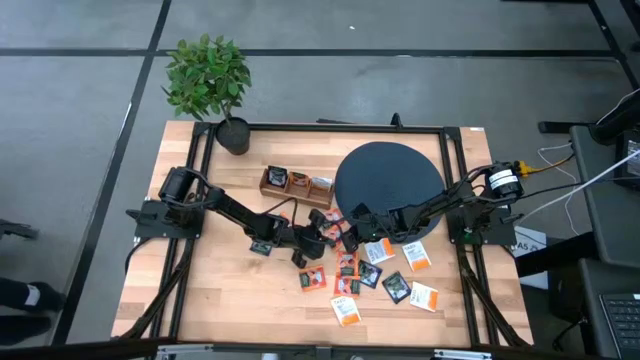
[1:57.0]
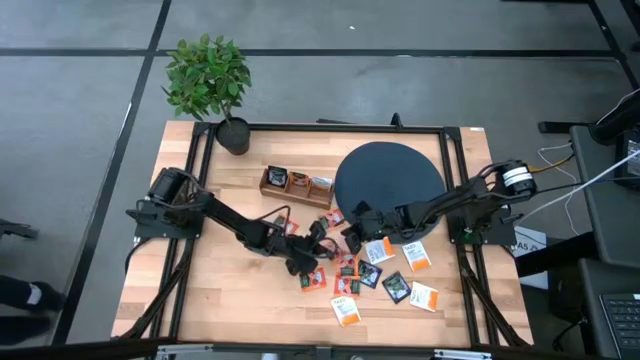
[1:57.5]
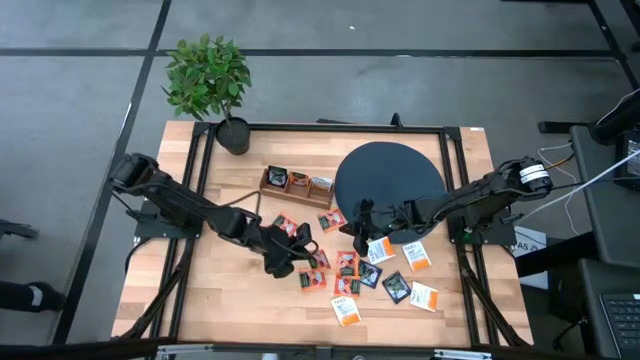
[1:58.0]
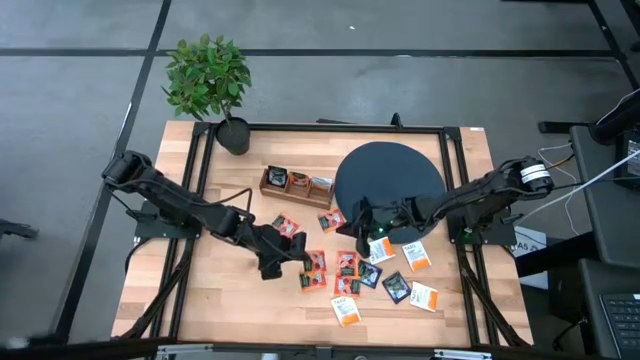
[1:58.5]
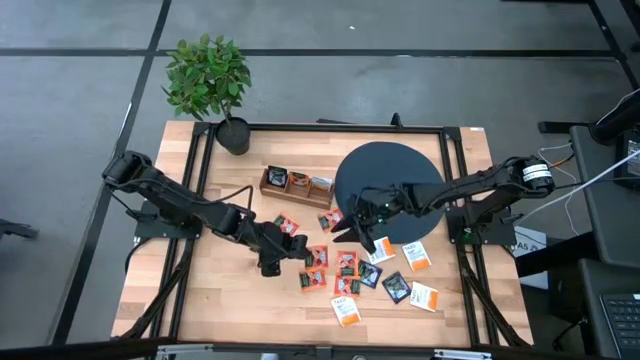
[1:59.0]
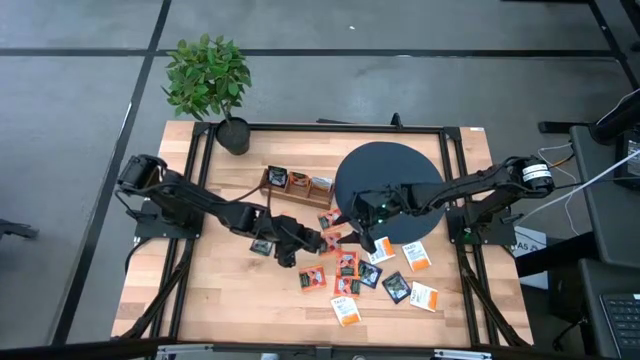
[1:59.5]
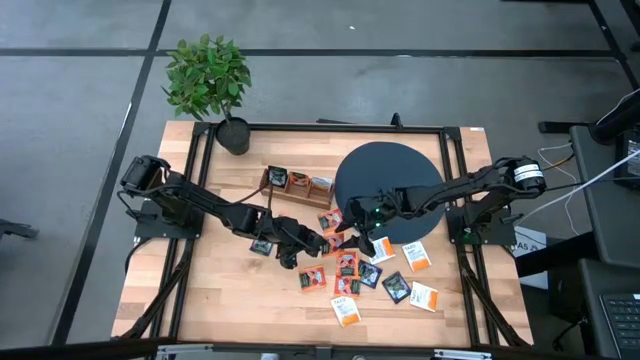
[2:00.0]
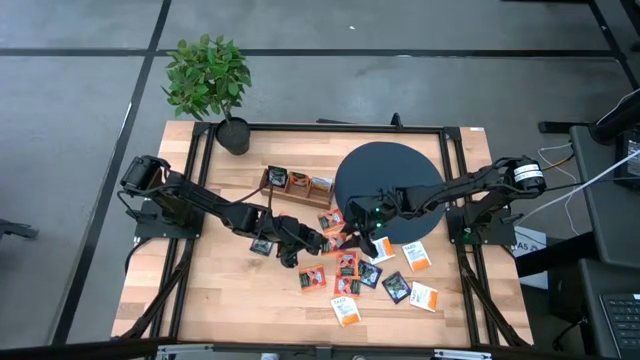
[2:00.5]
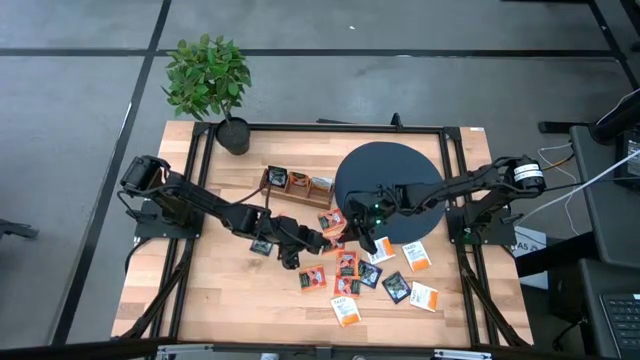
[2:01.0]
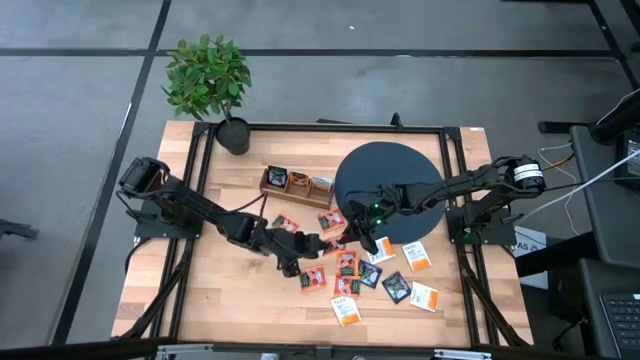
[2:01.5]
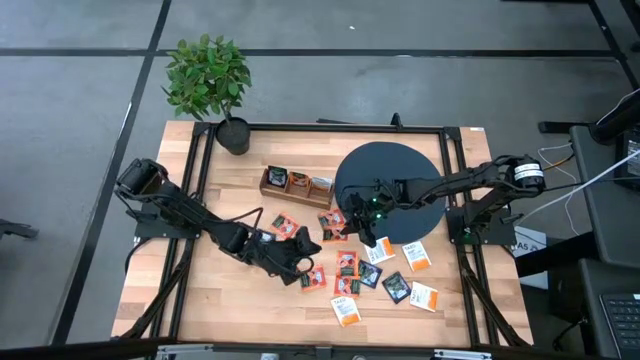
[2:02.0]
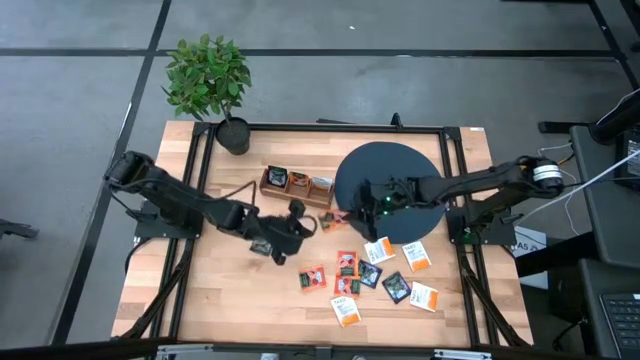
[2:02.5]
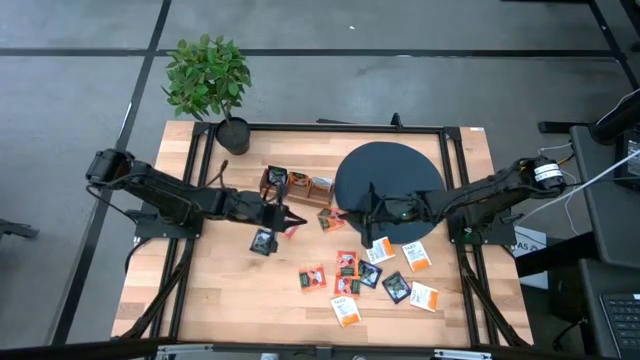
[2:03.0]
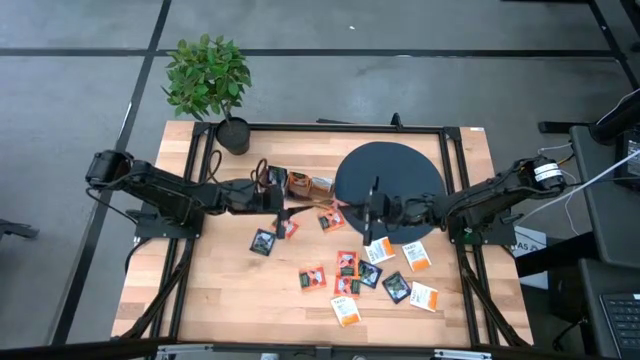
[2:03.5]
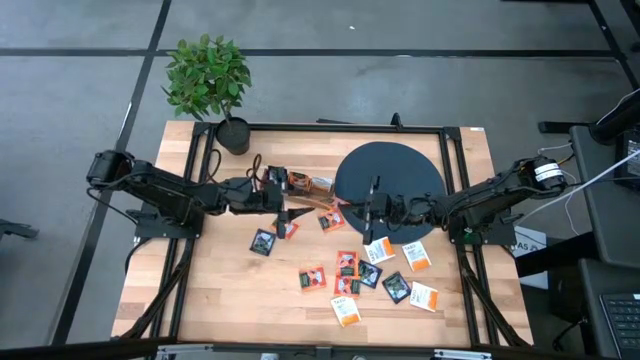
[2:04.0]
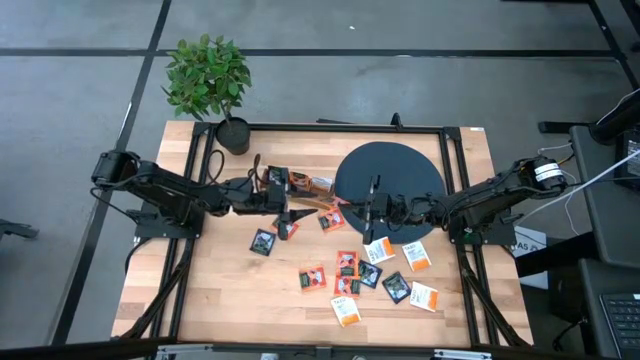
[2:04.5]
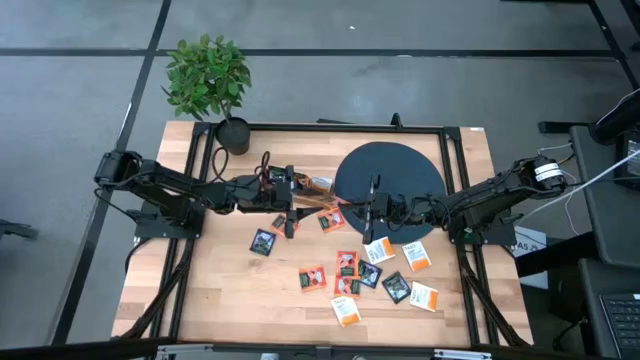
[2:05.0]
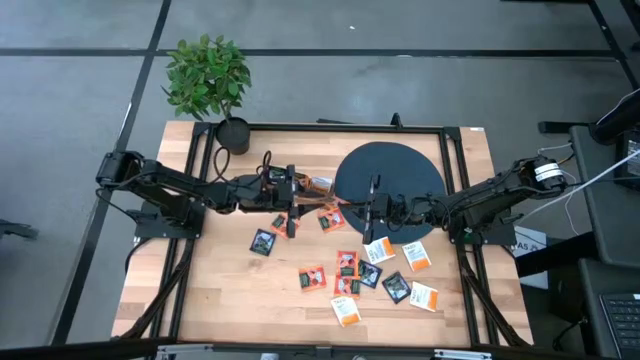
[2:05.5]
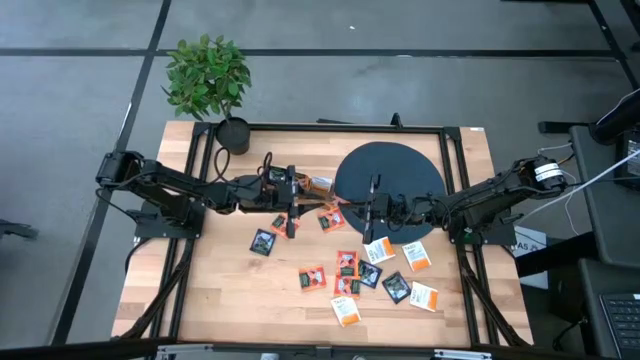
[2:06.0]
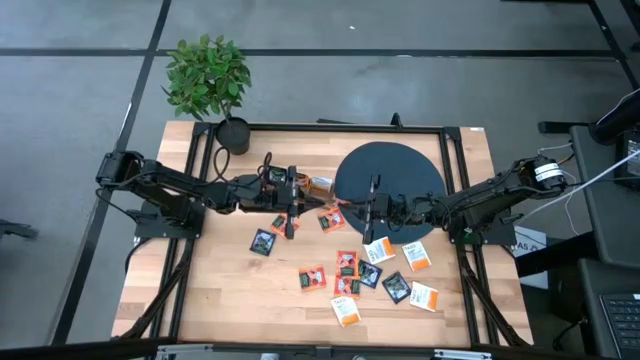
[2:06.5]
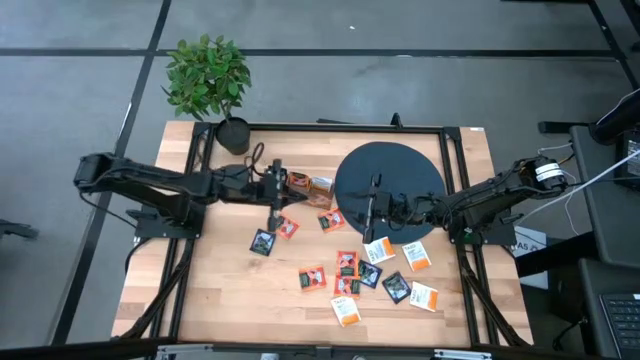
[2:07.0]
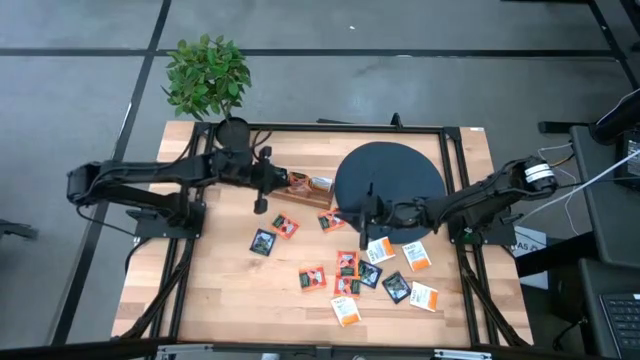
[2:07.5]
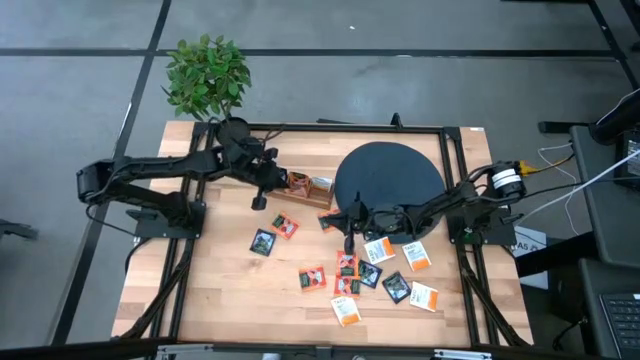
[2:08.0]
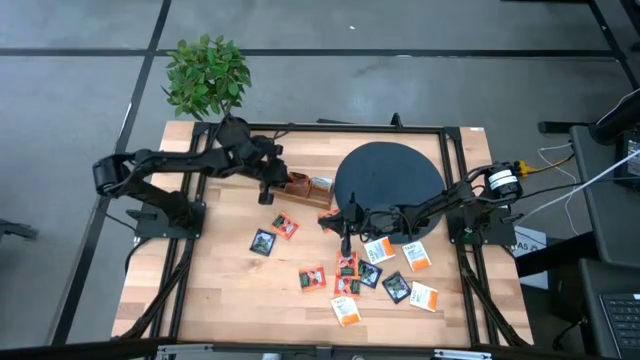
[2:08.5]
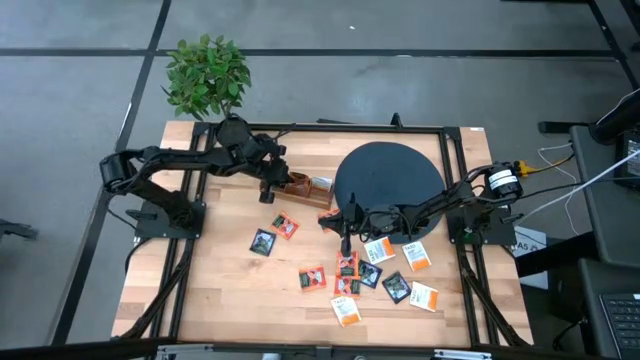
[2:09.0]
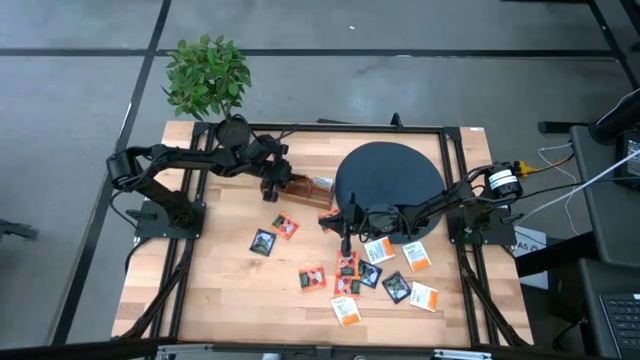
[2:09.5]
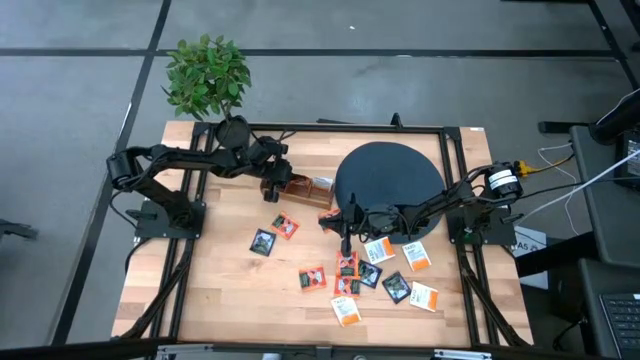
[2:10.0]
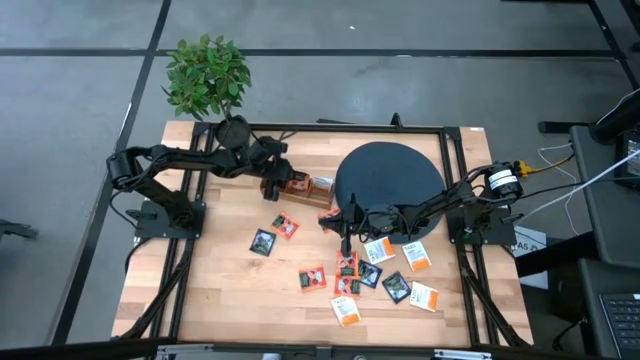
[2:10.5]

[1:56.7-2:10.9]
Task: Pick & Place Tea
Put the orange tea bag into the middle section of the wooden organizer

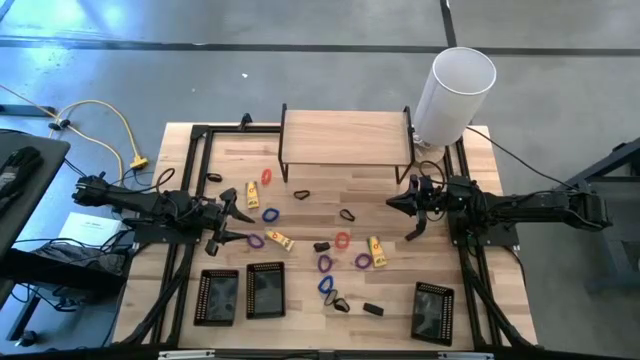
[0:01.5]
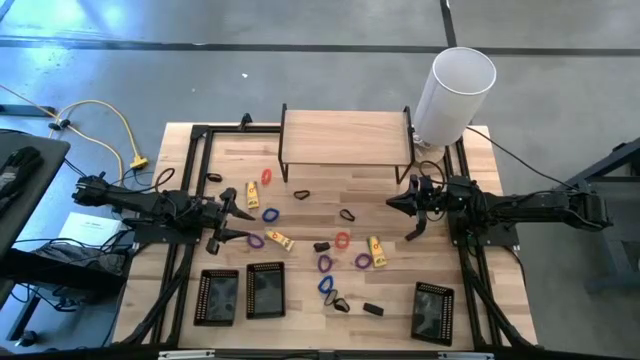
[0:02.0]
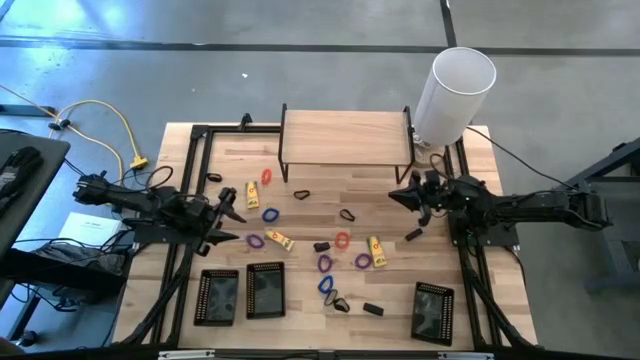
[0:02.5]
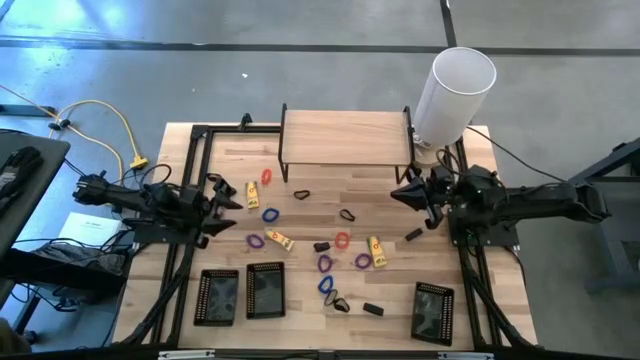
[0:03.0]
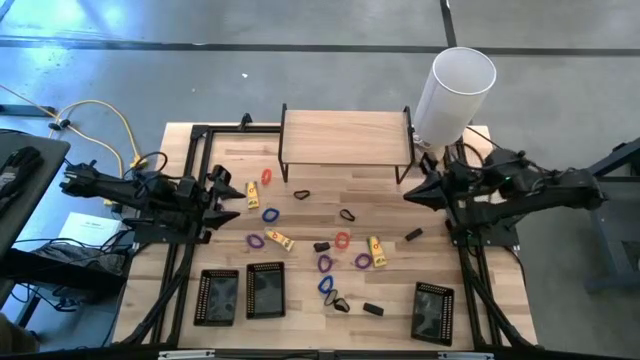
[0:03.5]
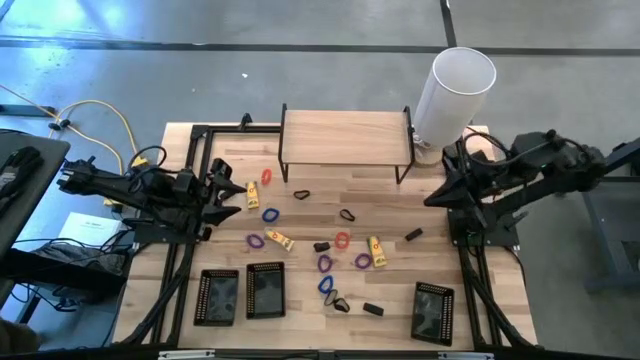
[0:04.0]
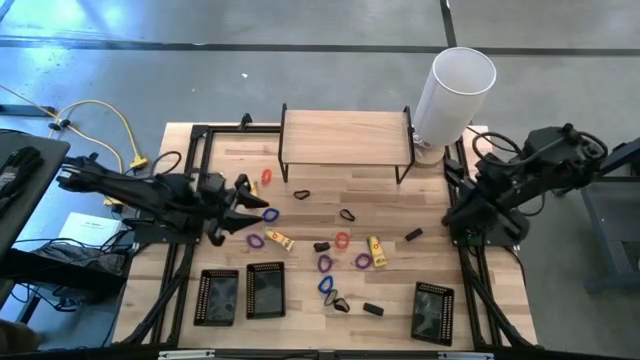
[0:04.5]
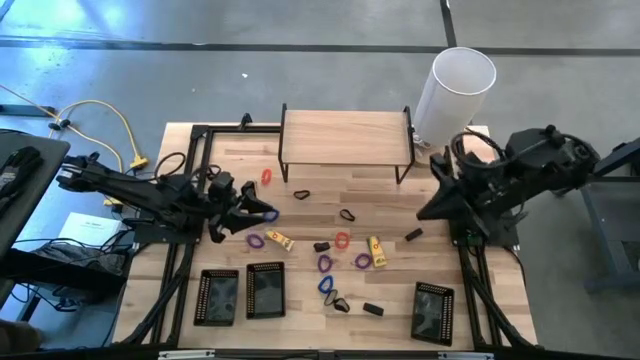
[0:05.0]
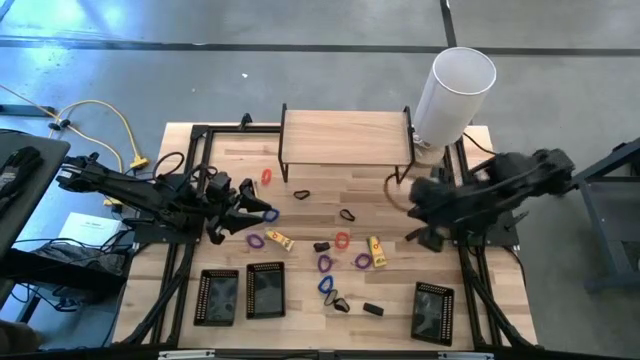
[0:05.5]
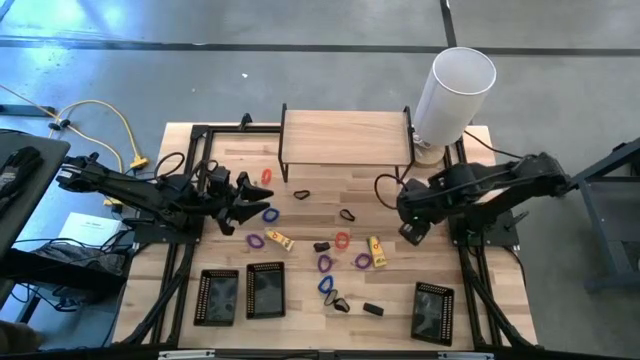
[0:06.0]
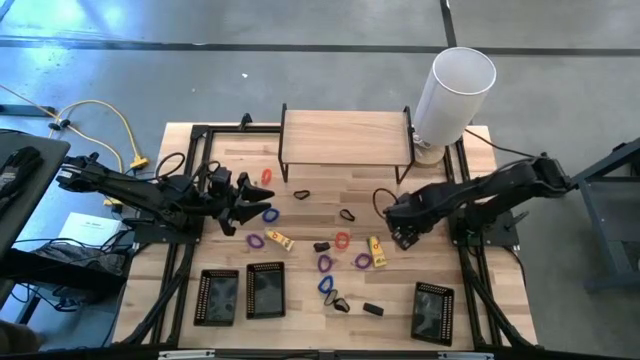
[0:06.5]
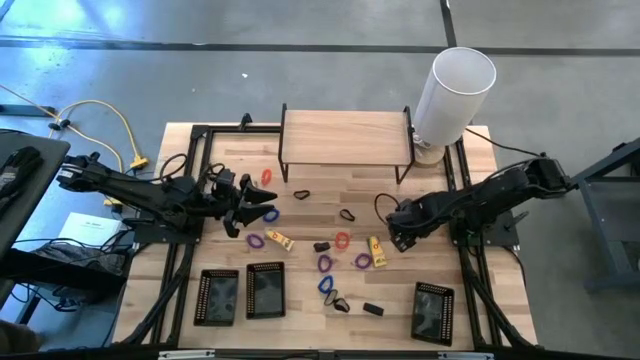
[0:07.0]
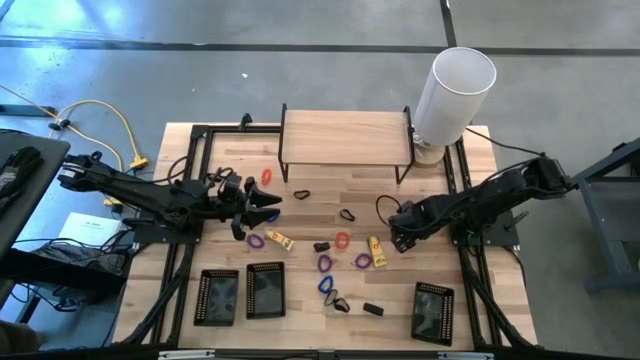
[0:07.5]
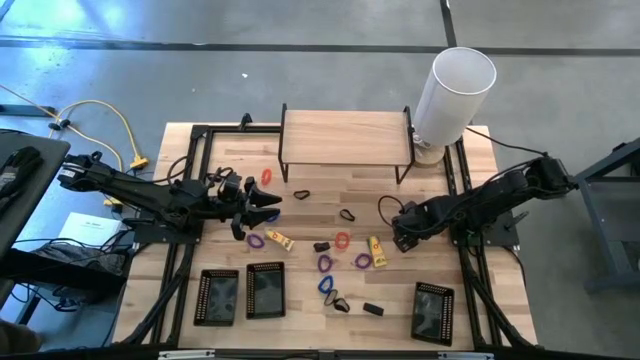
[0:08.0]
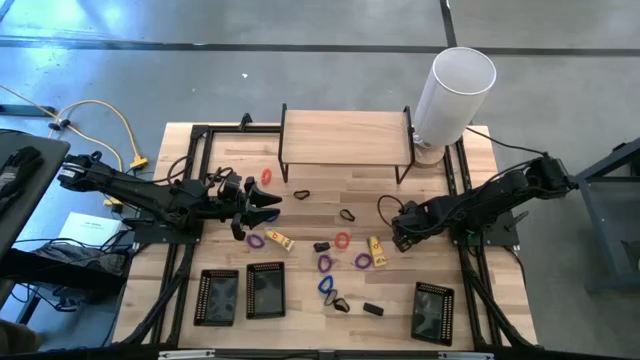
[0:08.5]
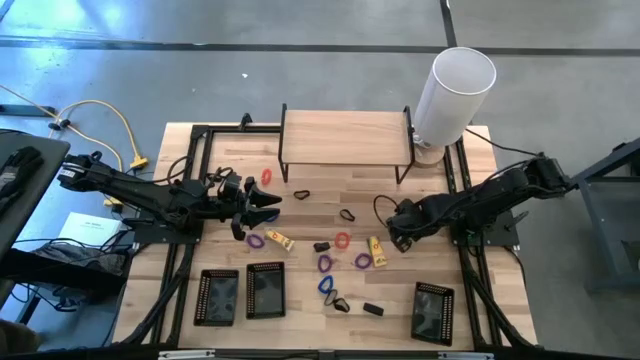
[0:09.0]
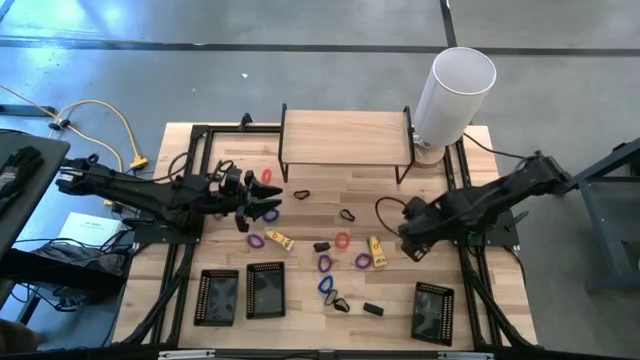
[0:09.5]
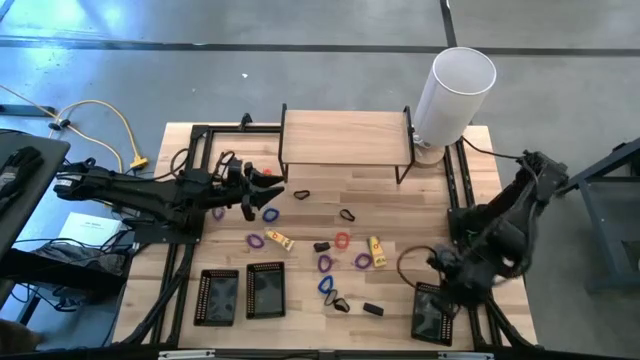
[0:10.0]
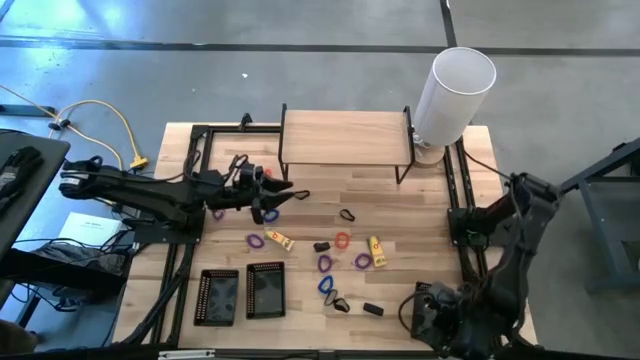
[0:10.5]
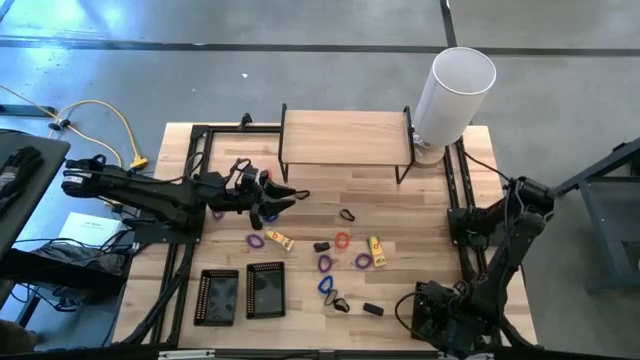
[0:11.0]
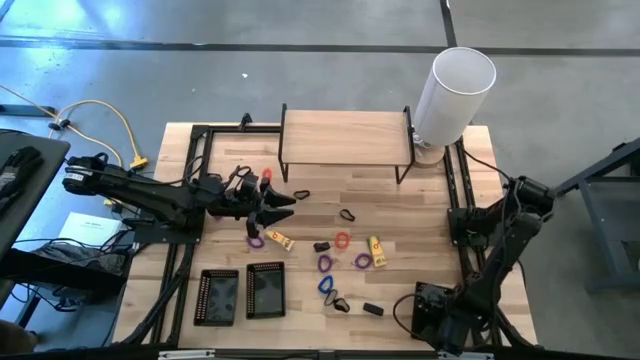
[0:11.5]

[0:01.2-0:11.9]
Task: Pick & Place Office Desk Supplies
Put the black rubber band into the right black basket
